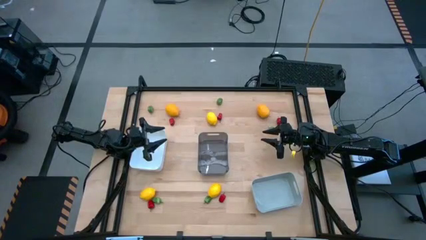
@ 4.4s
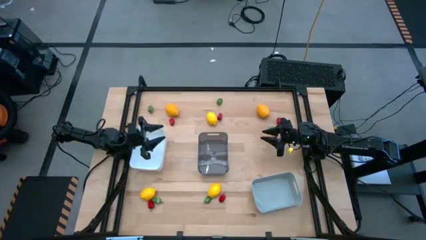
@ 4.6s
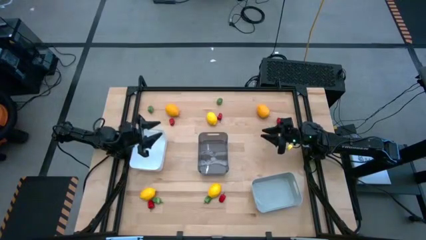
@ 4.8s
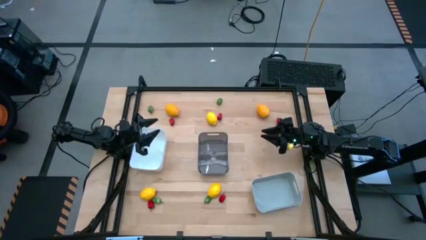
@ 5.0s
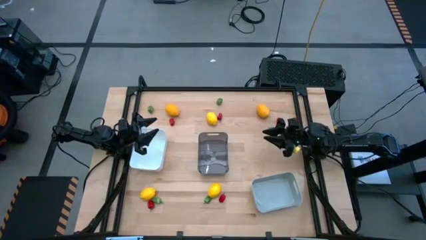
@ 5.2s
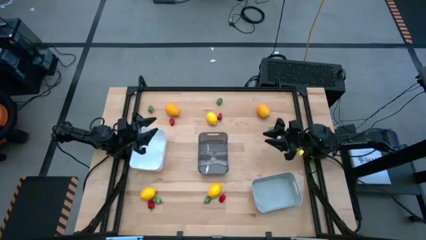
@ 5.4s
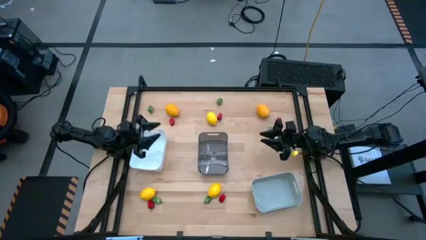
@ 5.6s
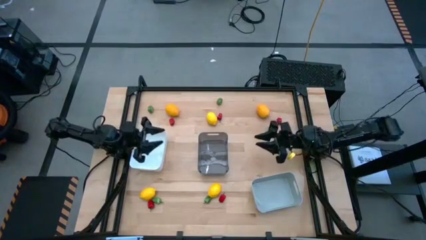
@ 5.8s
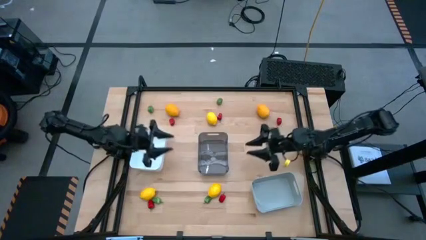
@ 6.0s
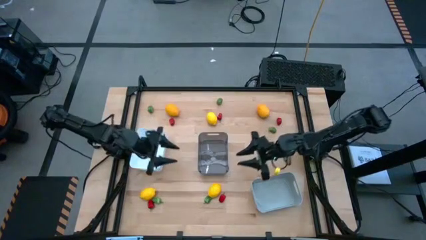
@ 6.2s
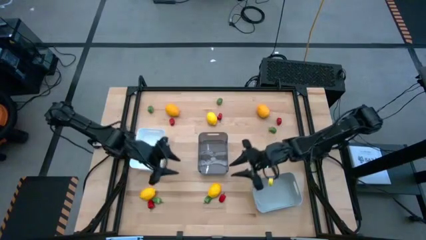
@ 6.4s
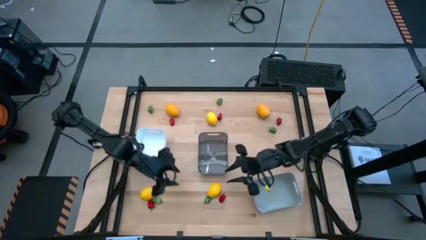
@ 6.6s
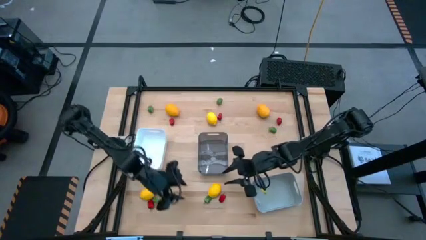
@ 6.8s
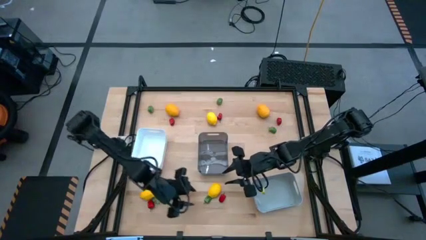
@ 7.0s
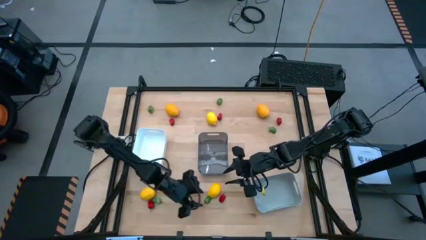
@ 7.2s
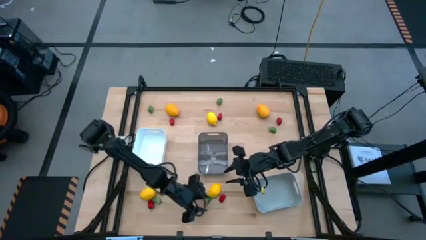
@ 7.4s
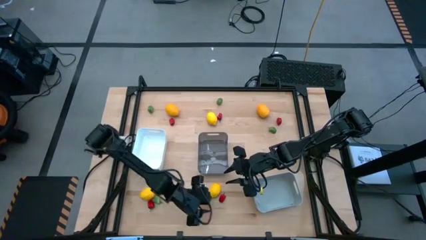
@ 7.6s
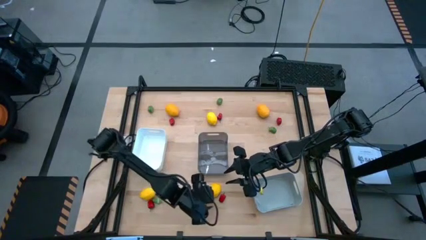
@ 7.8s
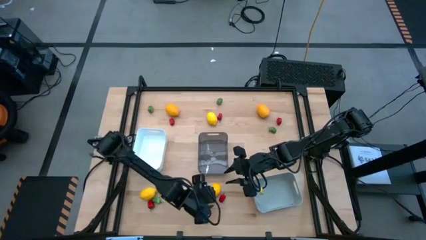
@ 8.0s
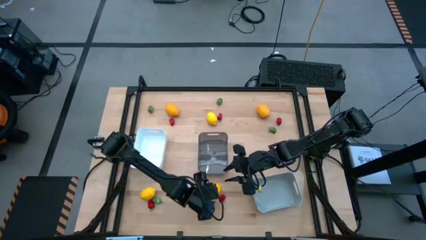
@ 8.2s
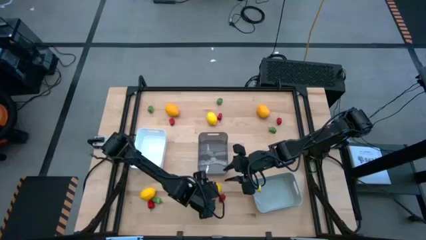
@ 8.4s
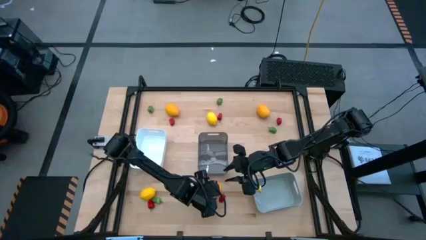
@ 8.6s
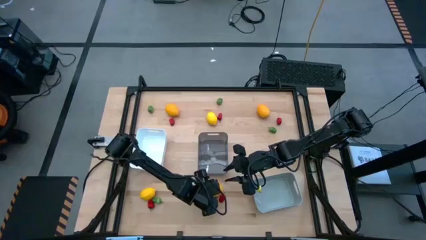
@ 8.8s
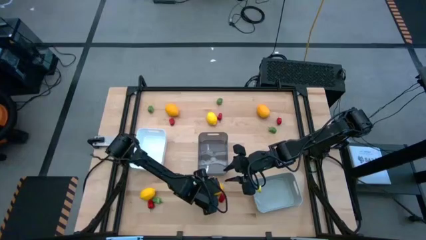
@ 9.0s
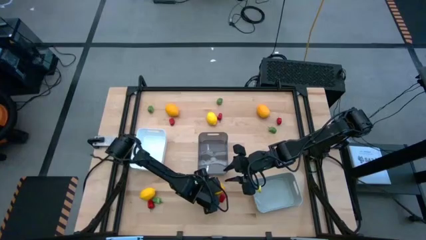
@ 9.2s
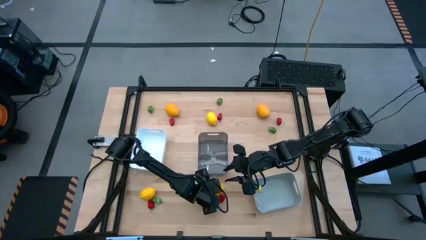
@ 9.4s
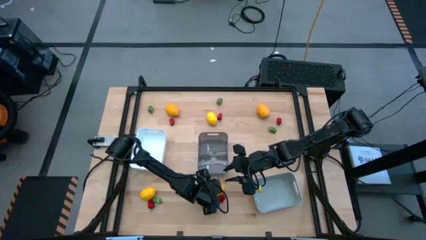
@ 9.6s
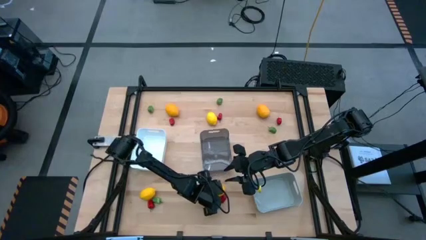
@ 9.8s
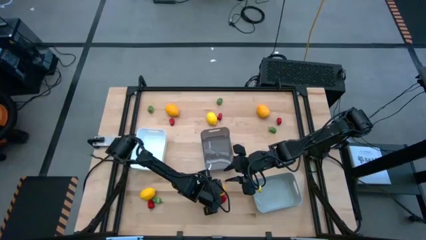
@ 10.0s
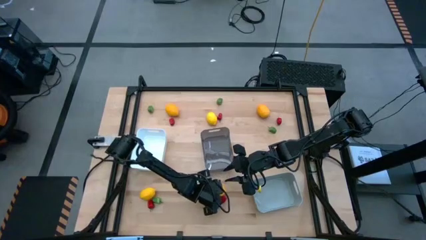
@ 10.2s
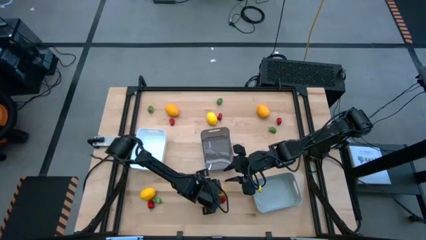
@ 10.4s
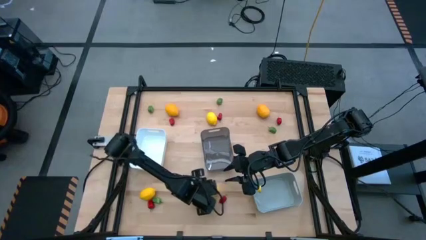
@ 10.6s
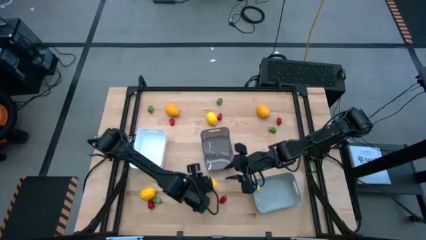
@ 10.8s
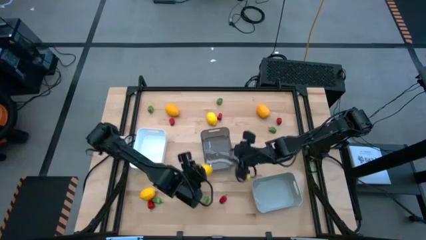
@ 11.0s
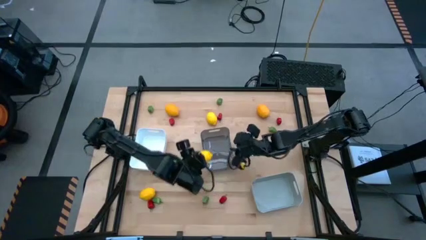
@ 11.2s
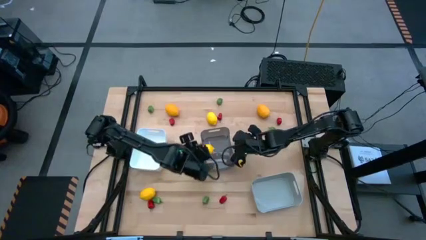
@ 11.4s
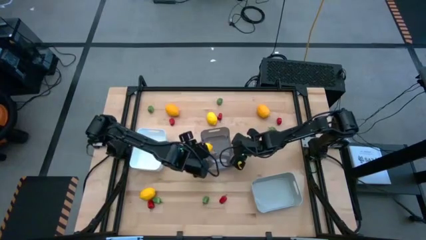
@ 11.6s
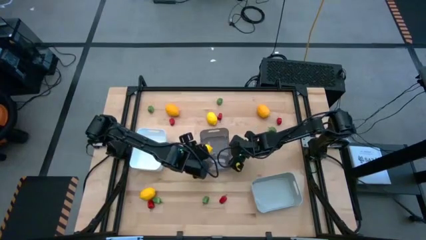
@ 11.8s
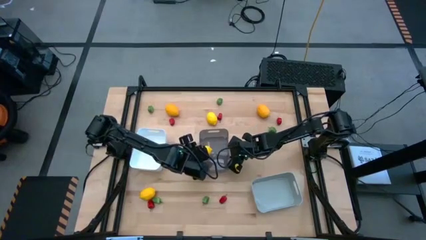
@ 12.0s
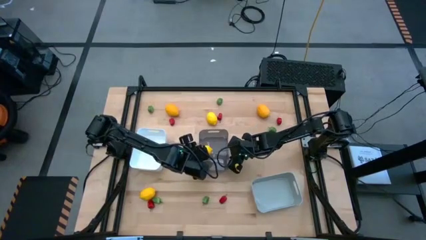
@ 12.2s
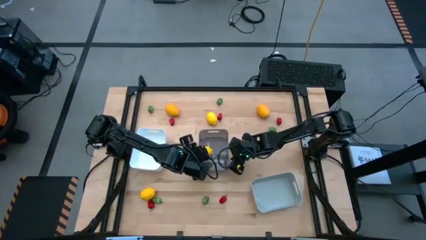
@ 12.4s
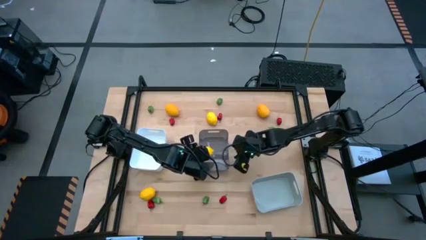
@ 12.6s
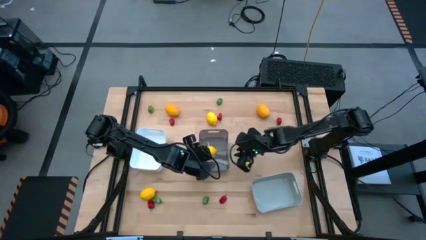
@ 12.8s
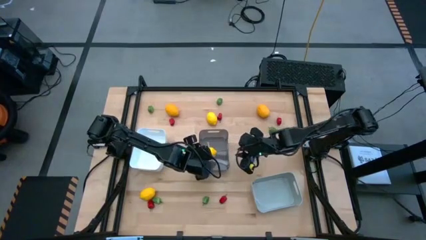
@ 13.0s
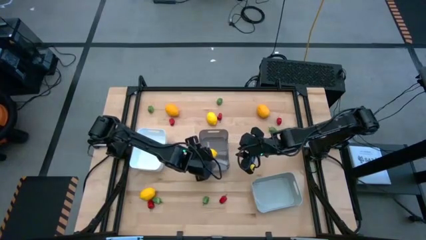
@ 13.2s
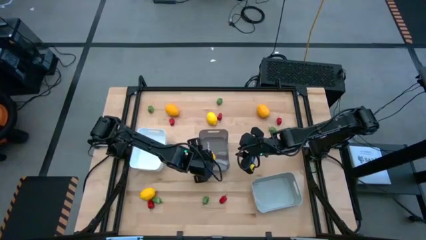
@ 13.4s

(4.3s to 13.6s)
Task: Sort produce into baskets
Put the lemon into the black bin

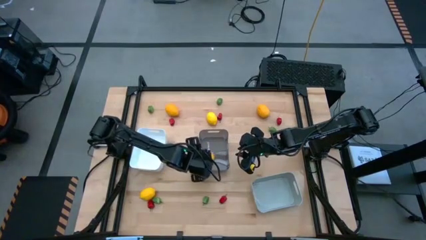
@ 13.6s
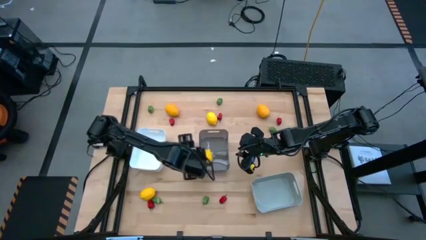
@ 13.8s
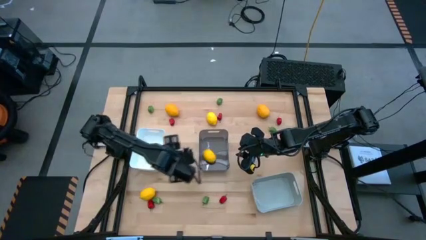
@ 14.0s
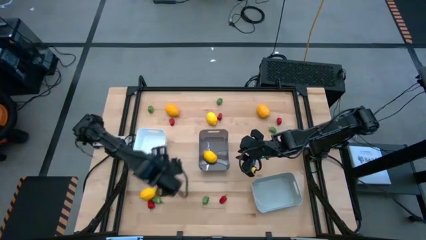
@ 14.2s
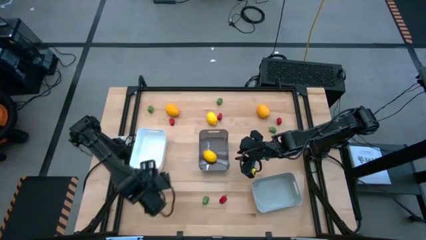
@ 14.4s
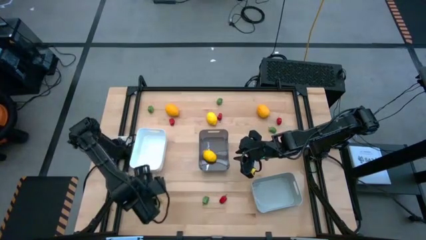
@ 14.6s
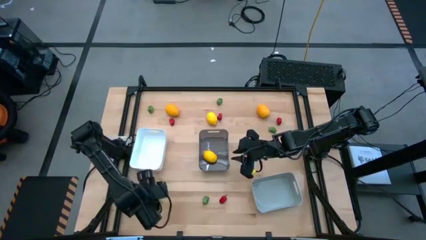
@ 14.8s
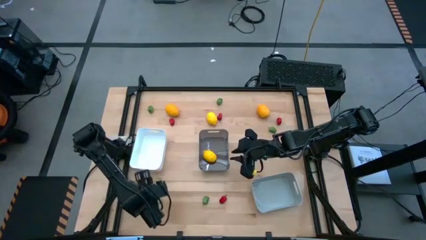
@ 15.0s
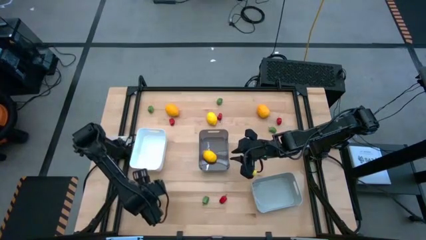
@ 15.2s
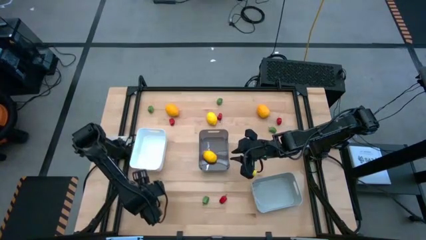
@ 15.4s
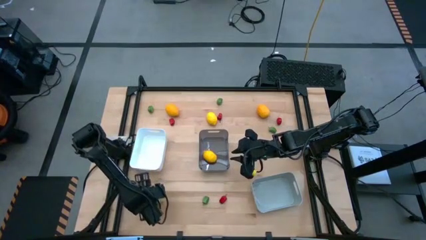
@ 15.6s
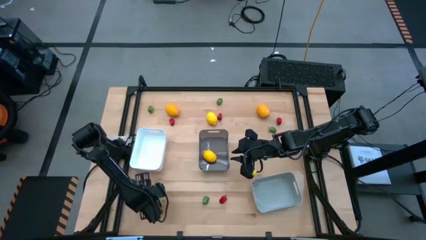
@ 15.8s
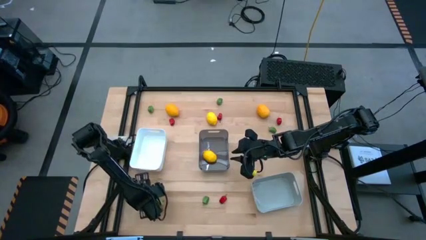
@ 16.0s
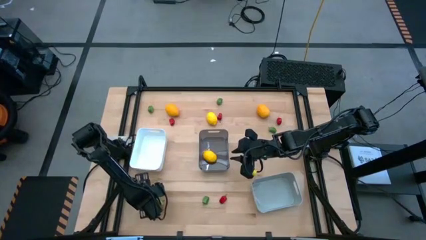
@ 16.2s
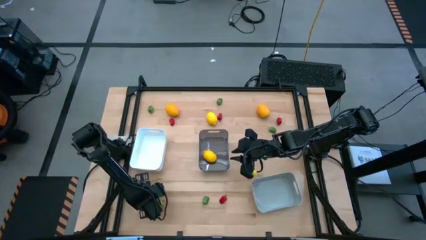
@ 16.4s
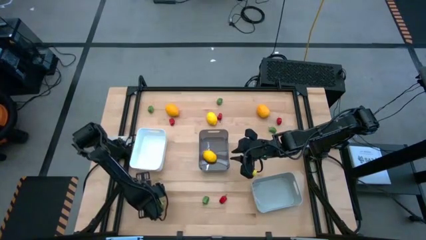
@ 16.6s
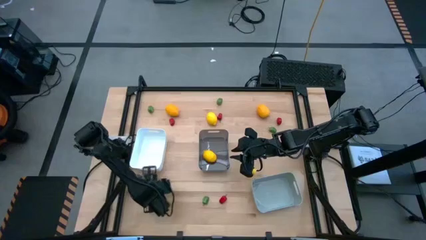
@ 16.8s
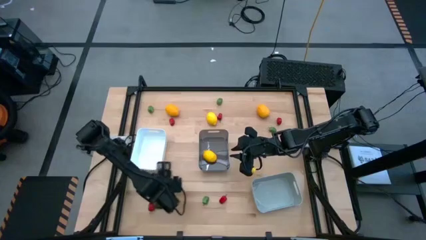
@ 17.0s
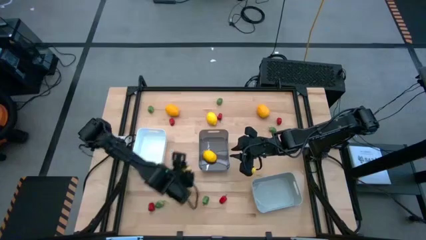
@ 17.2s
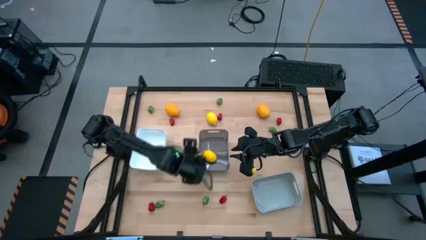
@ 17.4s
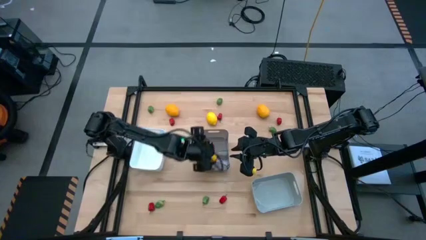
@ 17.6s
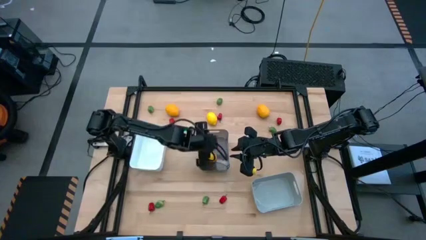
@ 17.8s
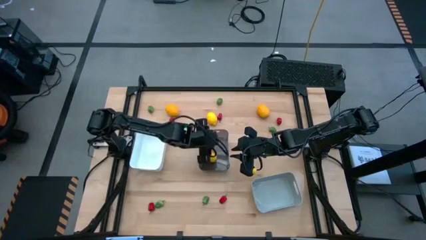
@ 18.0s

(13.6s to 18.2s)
Put the lemon into the black bin

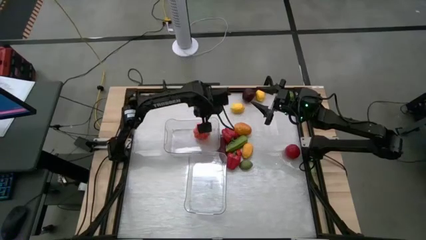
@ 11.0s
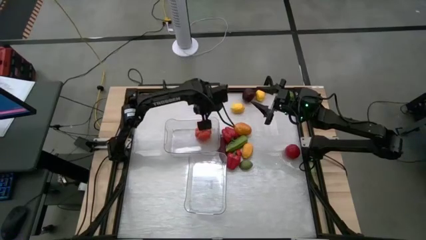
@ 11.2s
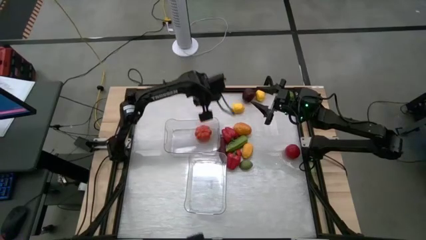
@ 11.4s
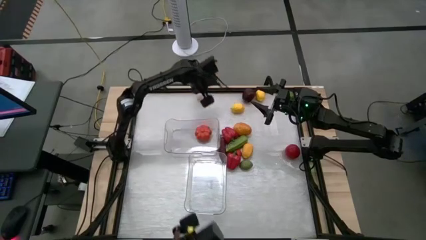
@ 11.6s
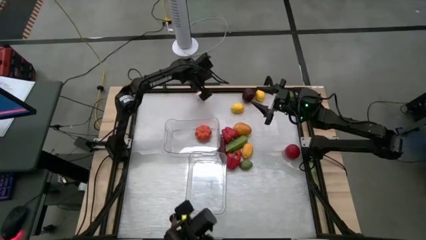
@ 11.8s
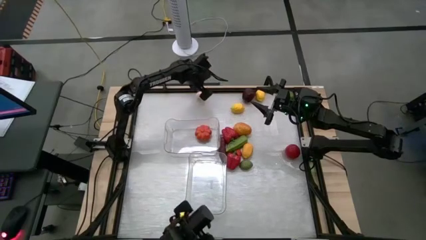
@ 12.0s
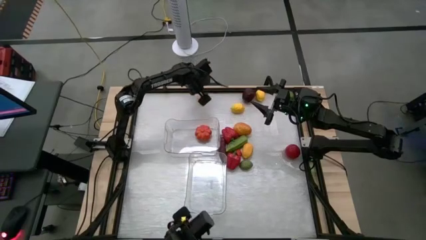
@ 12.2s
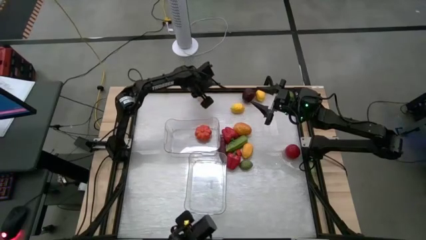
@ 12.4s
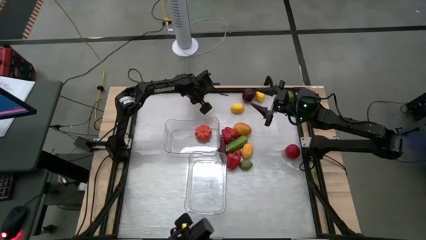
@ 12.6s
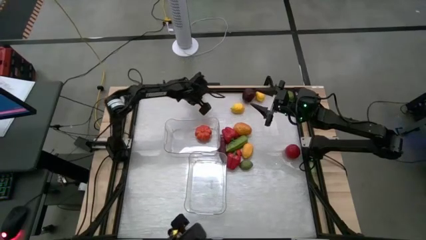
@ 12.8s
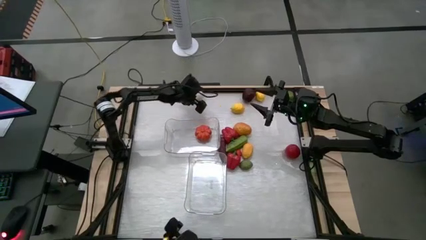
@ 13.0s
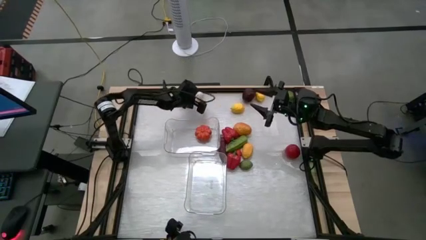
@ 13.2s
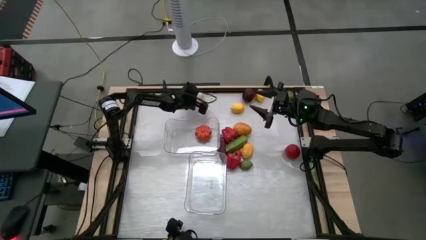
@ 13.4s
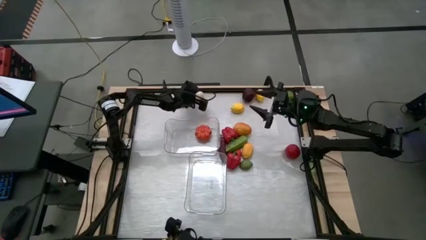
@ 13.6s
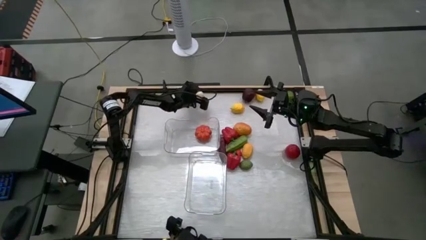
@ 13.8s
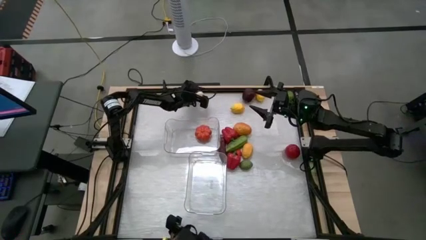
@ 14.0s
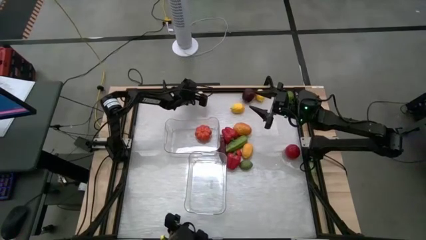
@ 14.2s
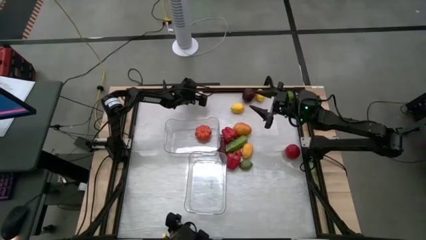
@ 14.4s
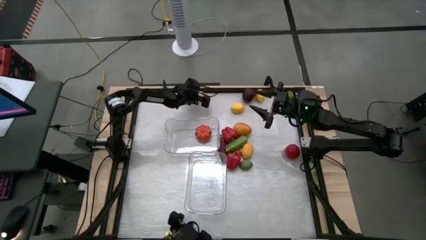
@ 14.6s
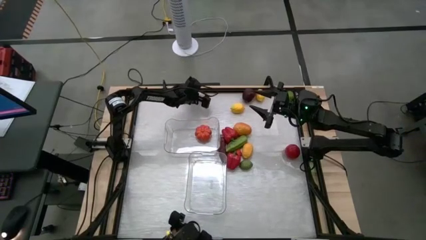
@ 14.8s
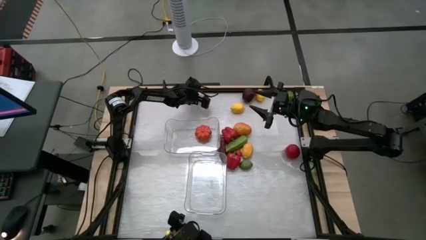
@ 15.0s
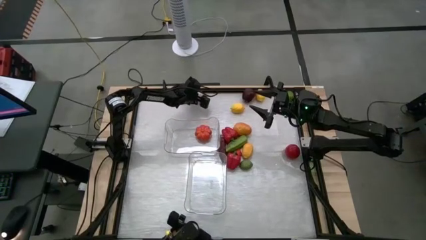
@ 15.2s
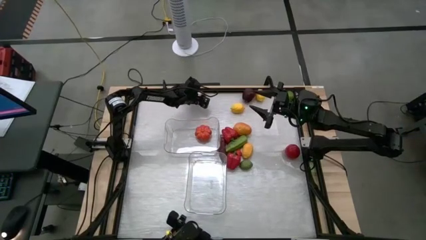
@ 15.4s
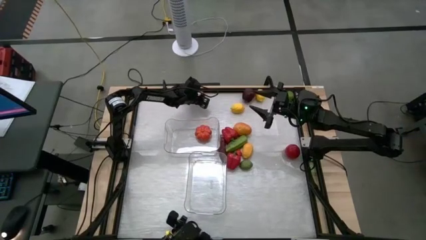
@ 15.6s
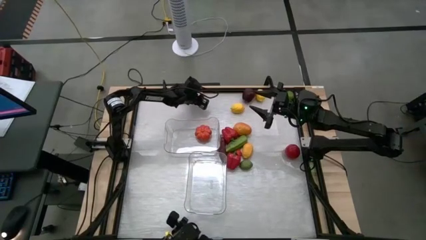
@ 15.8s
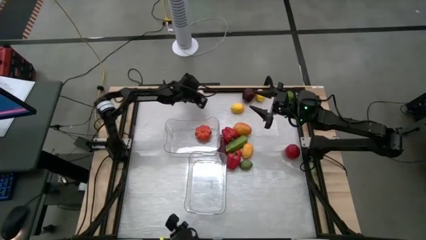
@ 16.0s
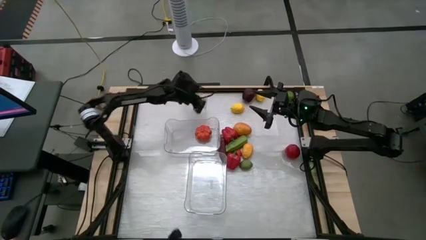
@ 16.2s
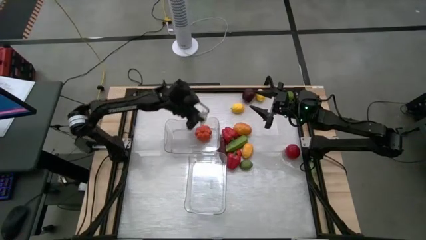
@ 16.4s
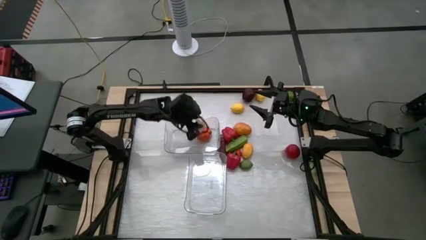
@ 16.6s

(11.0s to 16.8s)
Task: Sort produce into baskets
Put the garlic into the top transparent bin
